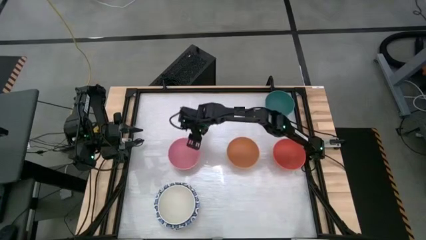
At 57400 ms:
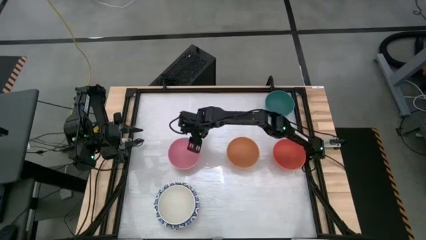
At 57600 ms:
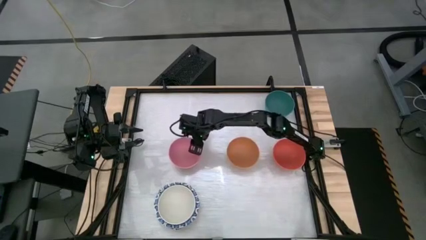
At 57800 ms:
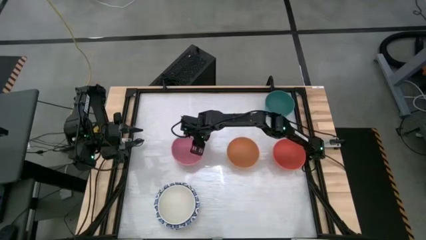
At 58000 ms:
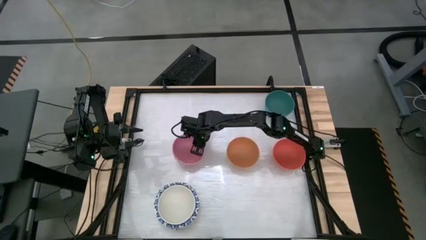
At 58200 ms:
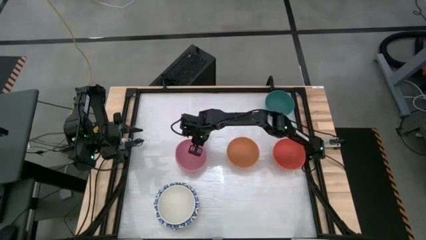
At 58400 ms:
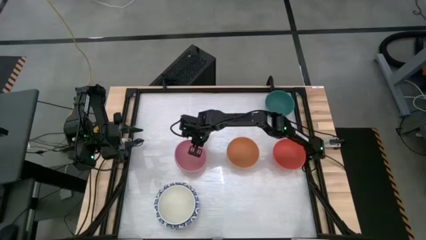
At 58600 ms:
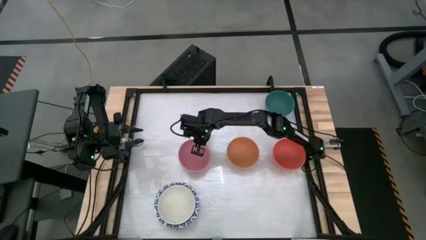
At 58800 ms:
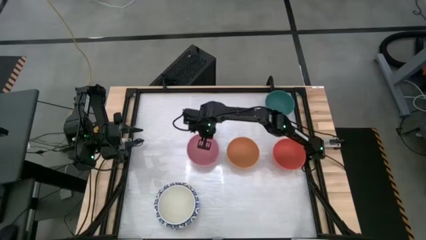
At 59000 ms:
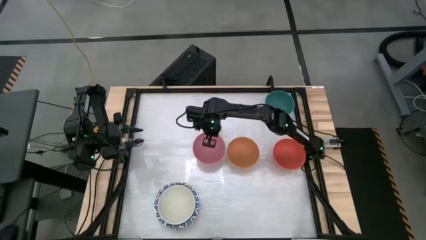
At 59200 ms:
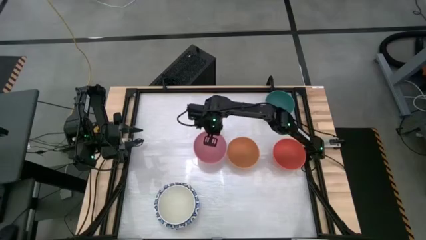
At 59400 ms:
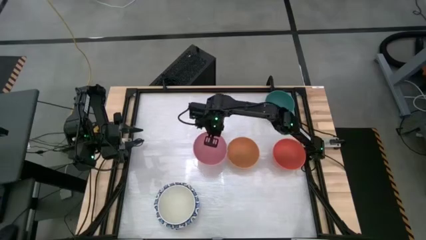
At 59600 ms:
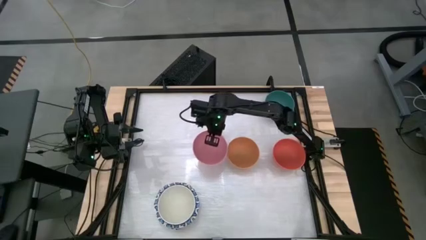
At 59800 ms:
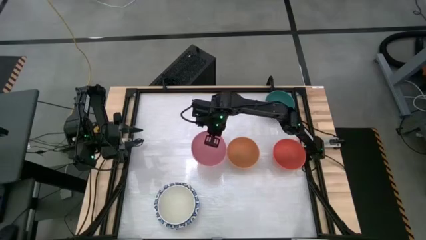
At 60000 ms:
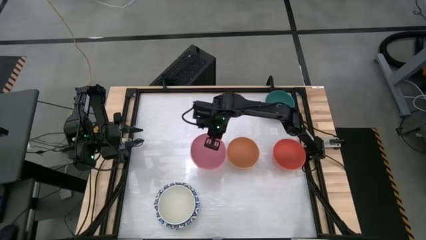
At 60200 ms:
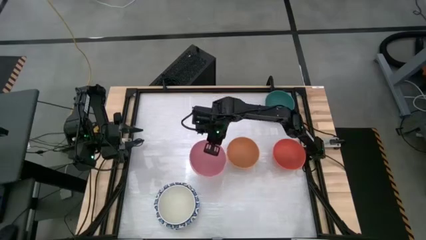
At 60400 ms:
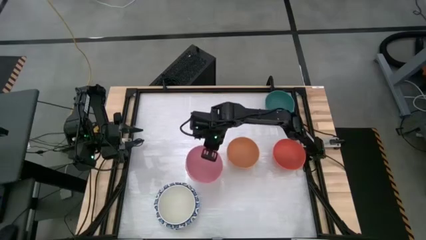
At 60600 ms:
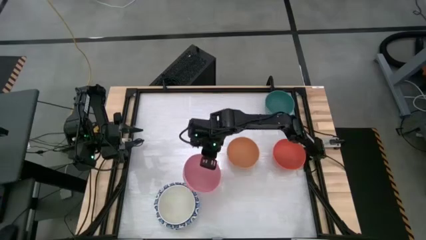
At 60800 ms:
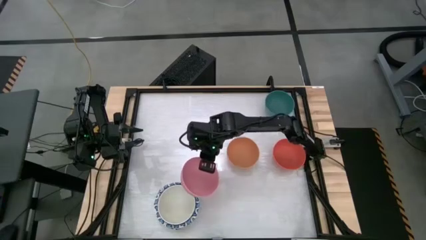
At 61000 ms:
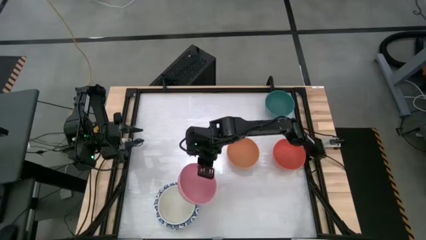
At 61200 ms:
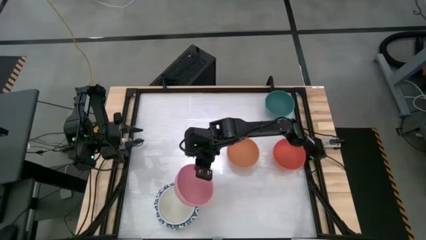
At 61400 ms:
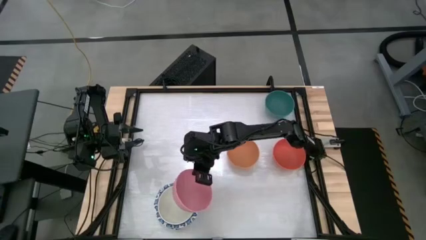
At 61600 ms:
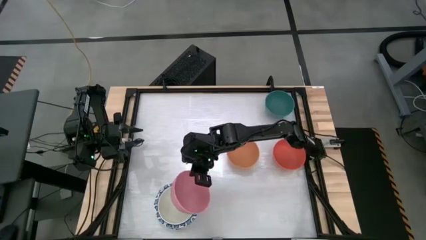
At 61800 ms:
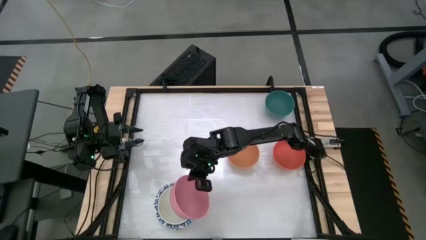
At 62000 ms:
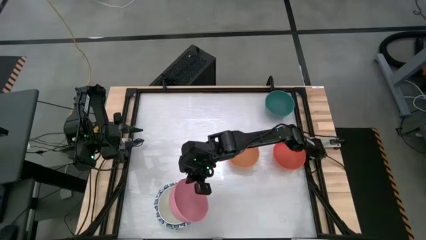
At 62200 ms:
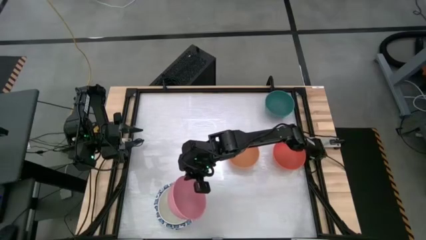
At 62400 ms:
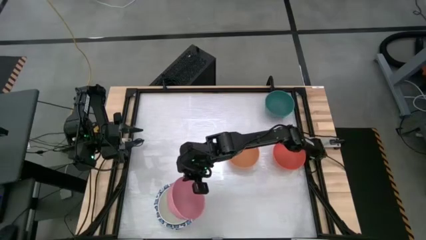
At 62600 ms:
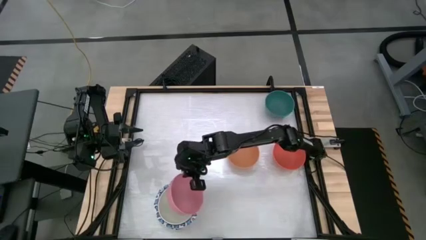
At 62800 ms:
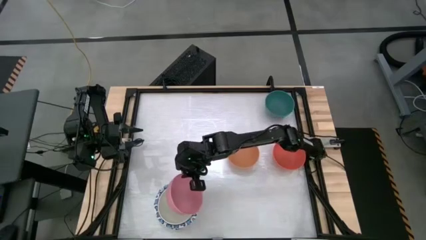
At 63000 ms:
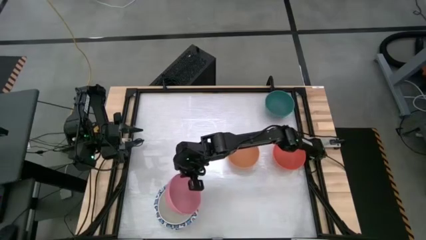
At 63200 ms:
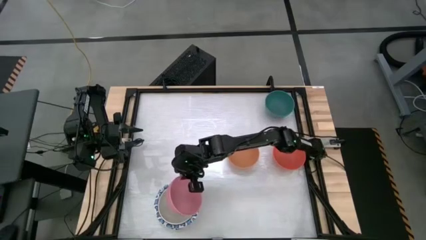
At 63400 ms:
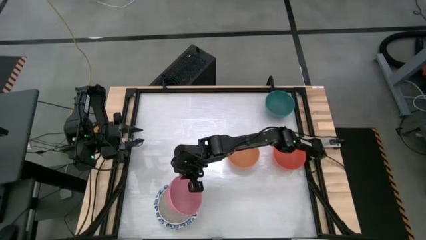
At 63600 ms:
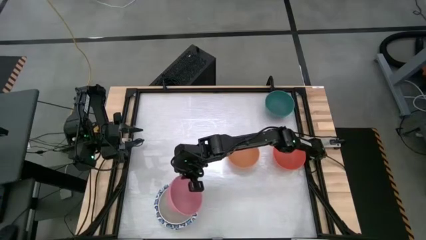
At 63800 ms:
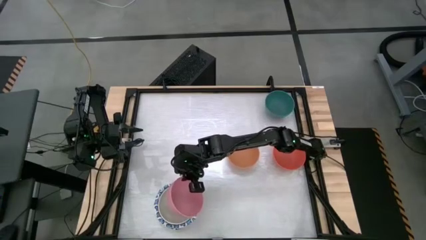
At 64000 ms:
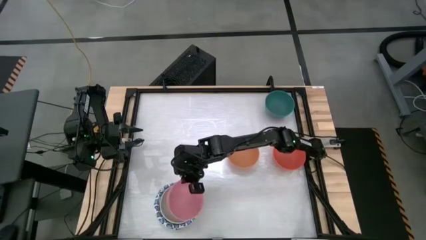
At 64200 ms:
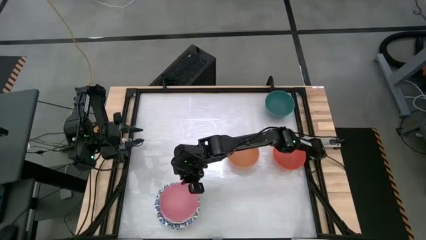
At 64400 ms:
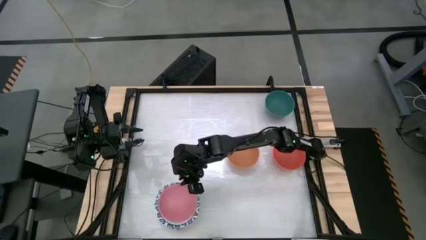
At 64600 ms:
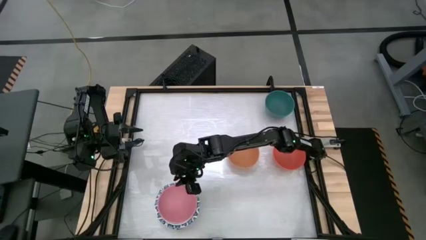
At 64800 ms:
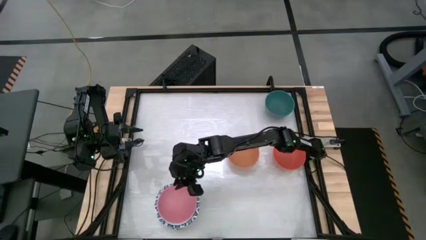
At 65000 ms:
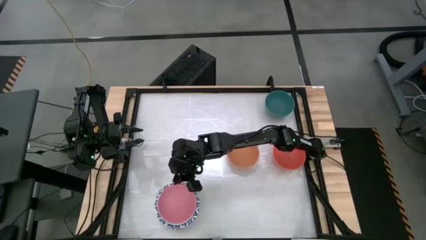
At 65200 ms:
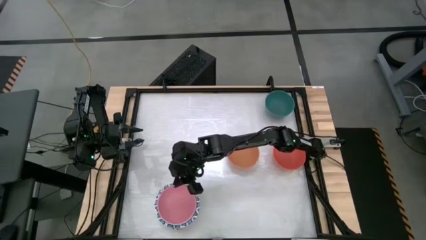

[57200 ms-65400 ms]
Stack the pink bowl on top of the other white bowl

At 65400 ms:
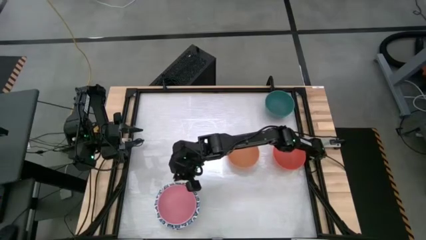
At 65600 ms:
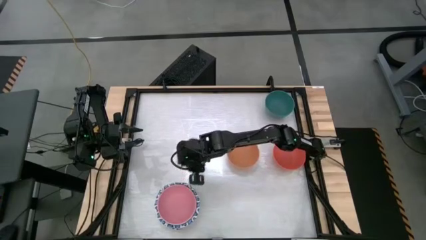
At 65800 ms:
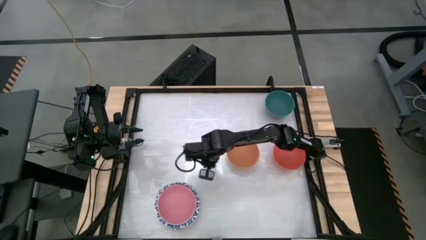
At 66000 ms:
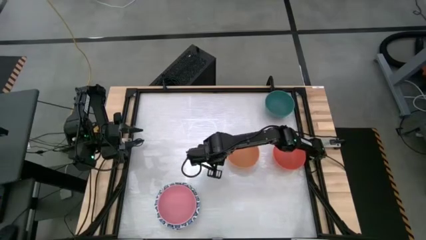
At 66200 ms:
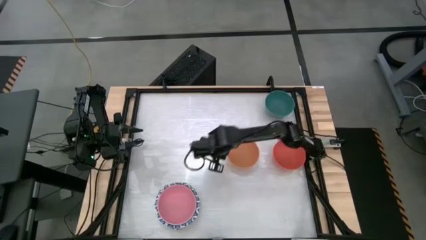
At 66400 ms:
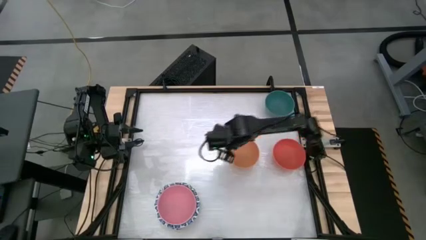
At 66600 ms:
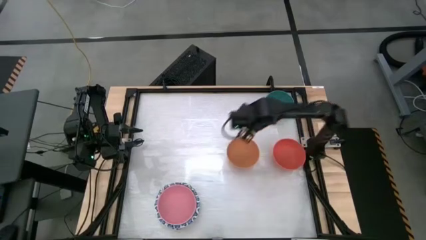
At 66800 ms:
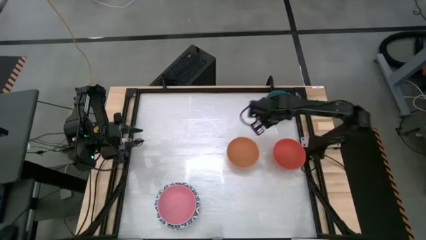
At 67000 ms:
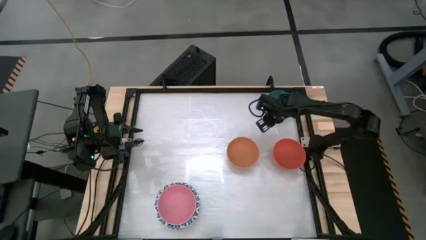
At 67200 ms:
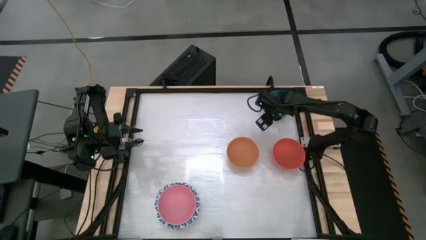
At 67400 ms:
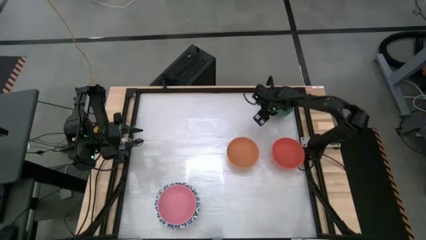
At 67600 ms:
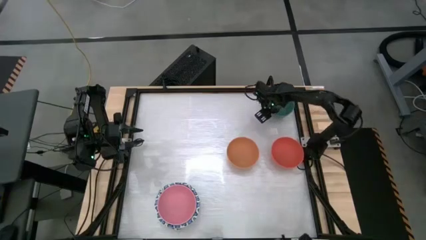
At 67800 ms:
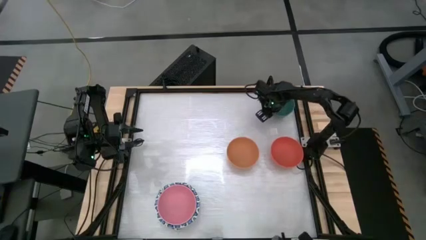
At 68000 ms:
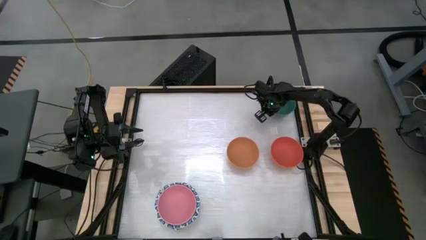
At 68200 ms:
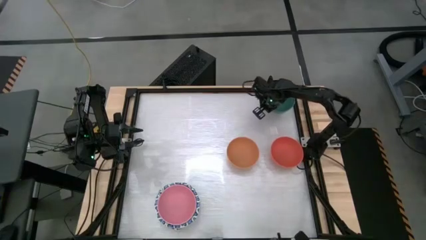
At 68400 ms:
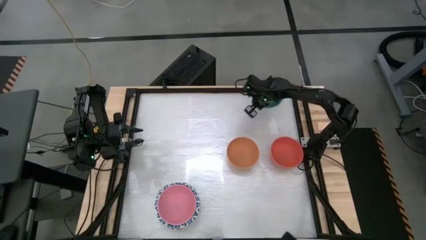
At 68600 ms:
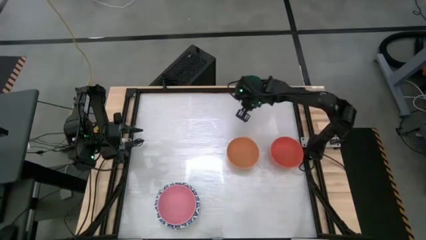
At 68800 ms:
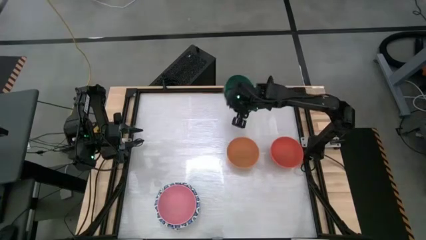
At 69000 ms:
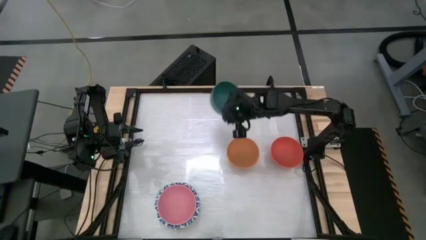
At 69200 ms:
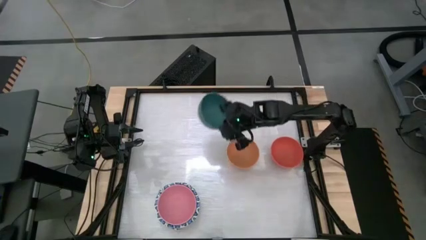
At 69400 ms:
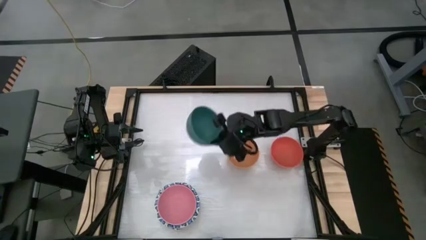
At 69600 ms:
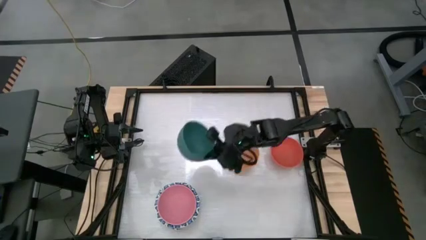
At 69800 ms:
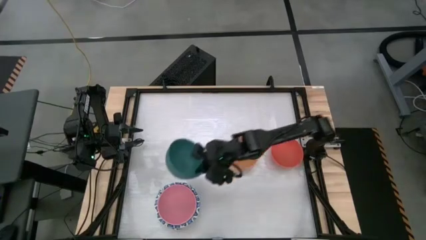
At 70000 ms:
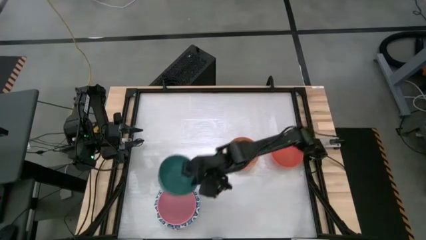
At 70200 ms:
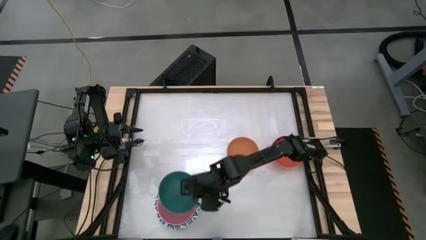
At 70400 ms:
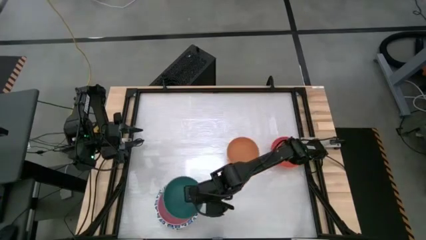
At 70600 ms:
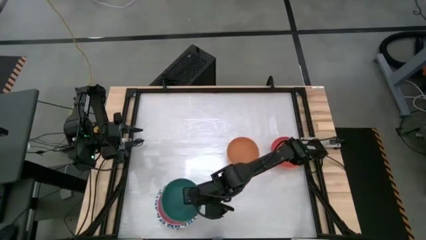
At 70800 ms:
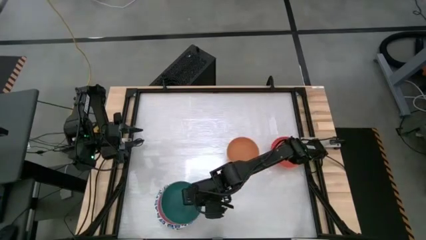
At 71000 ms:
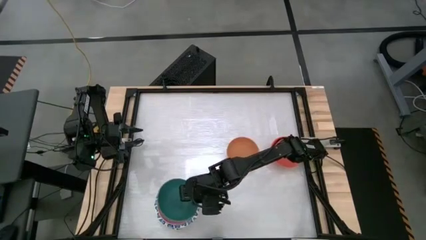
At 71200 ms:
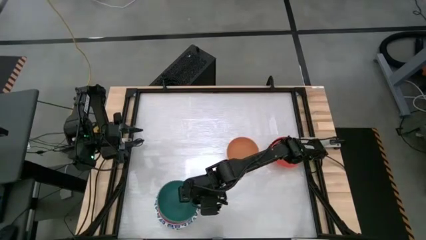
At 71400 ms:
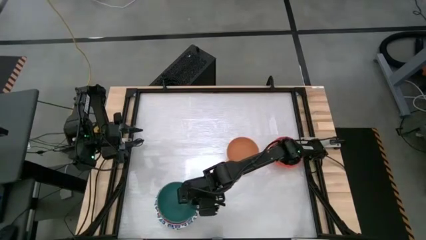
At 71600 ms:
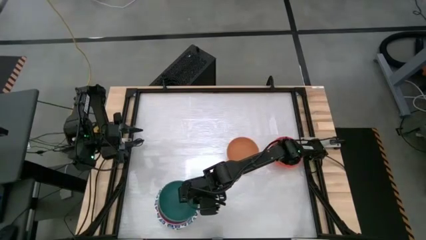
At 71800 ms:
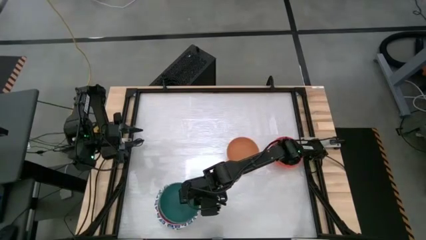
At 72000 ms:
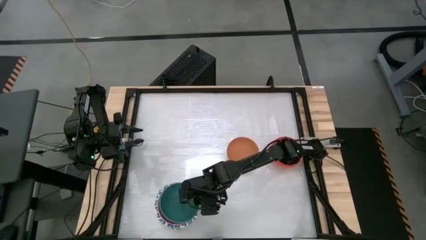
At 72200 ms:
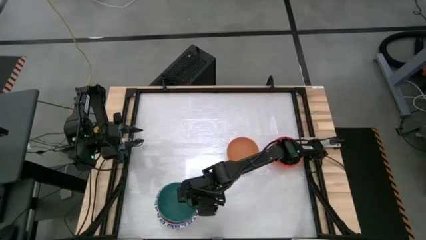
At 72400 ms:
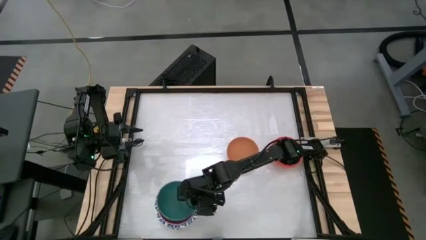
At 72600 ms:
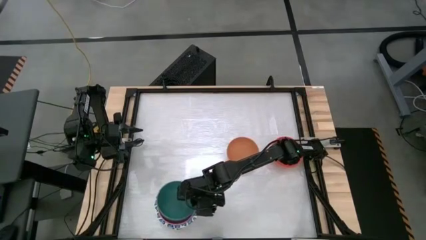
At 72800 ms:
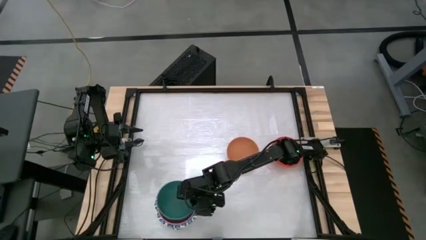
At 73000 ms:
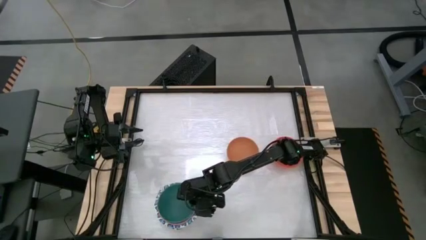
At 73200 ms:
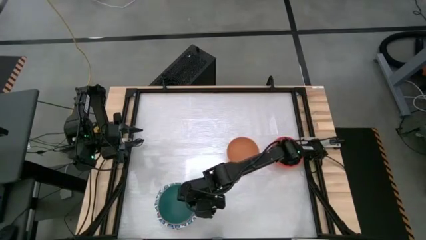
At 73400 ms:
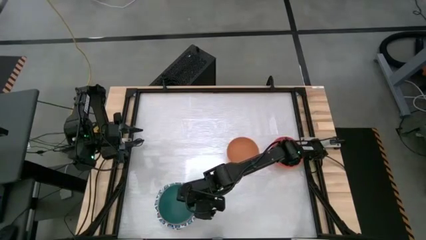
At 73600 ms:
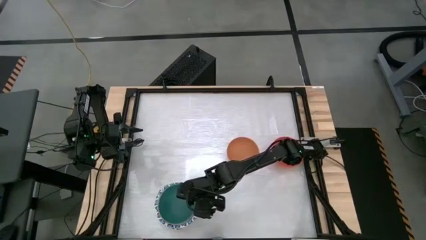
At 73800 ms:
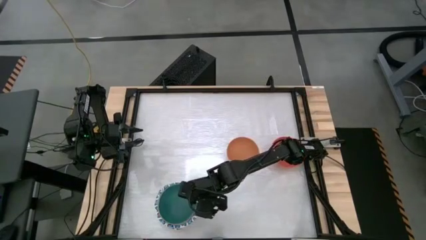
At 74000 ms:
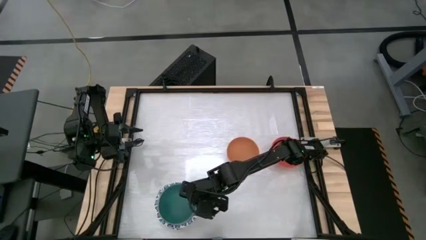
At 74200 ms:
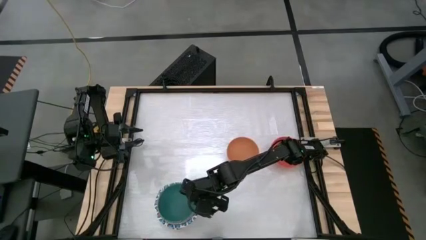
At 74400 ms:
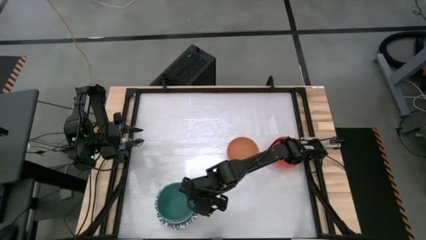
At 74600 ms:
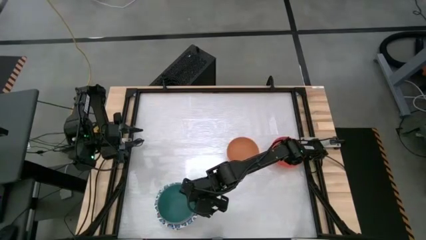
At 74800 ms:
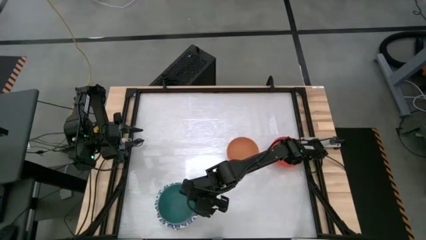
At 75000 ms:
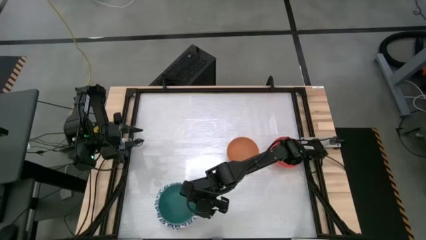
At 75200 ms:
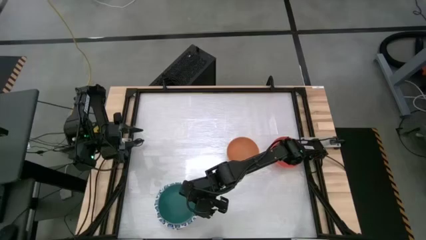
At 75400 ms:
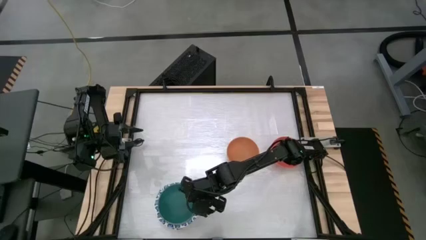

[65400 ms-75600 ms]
Stack the green bowl on top of the other pink bowl
